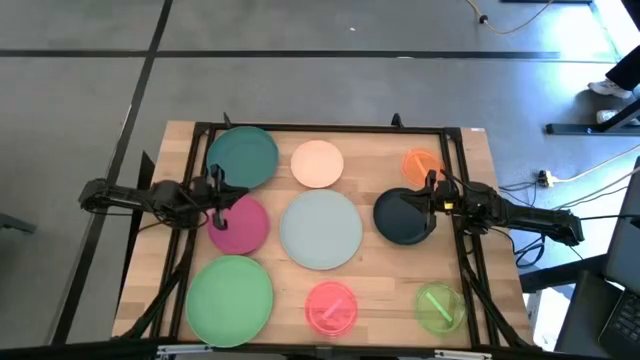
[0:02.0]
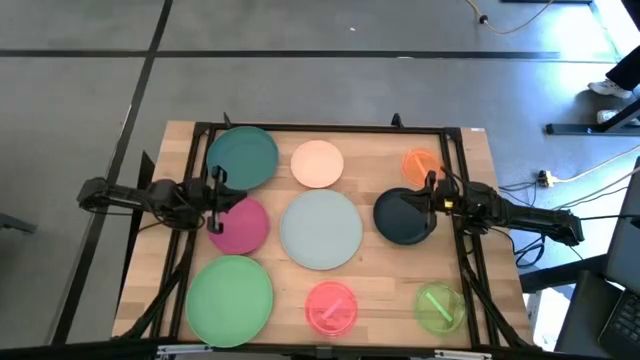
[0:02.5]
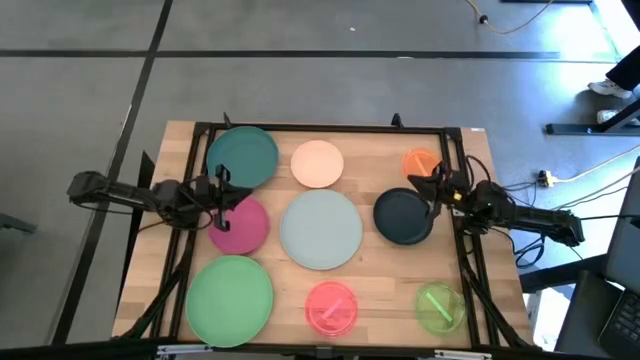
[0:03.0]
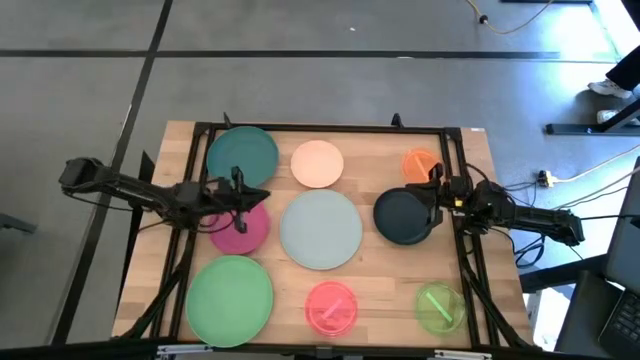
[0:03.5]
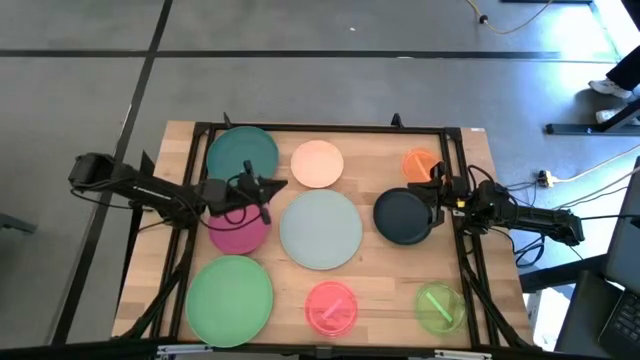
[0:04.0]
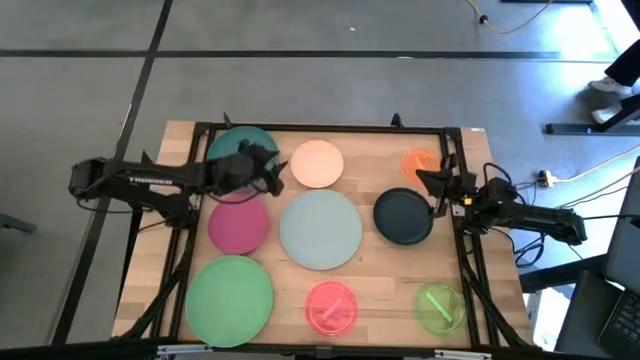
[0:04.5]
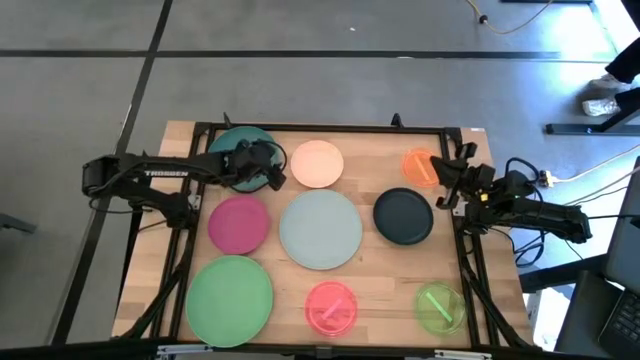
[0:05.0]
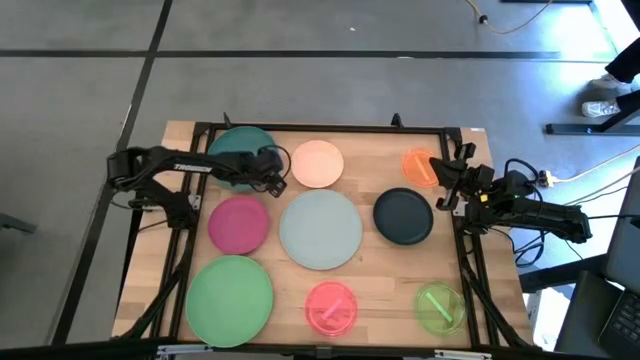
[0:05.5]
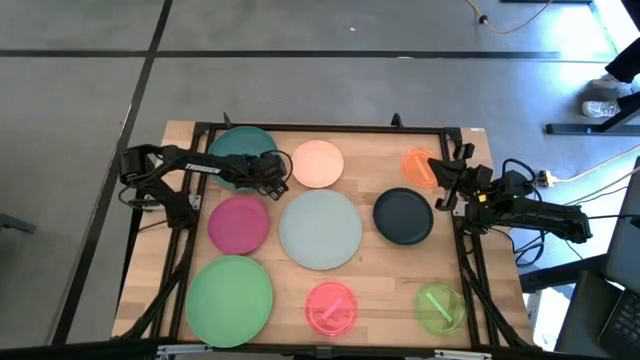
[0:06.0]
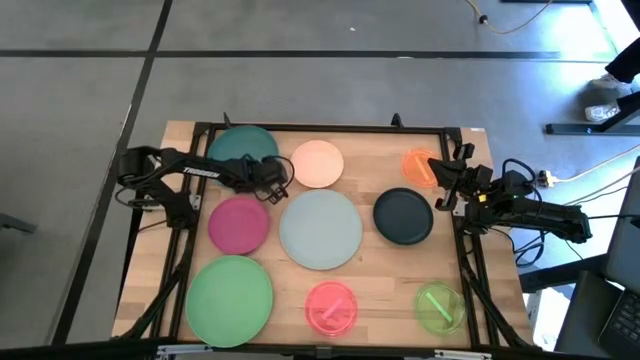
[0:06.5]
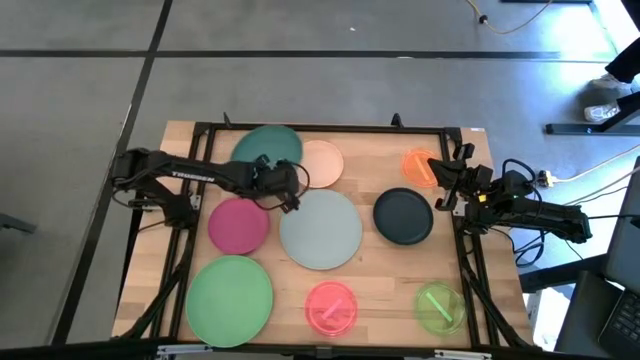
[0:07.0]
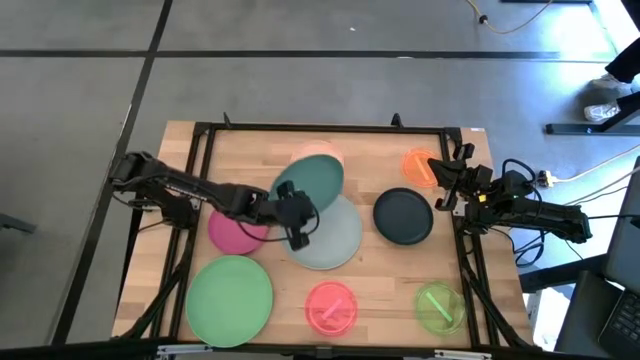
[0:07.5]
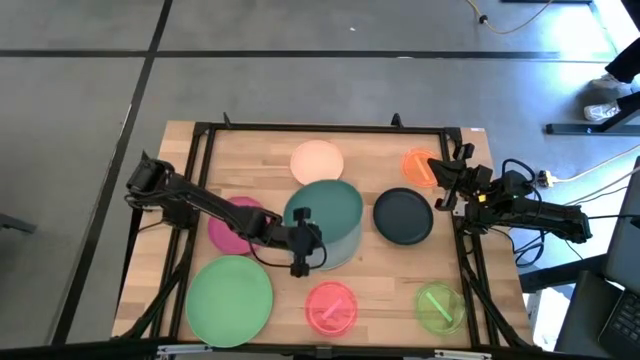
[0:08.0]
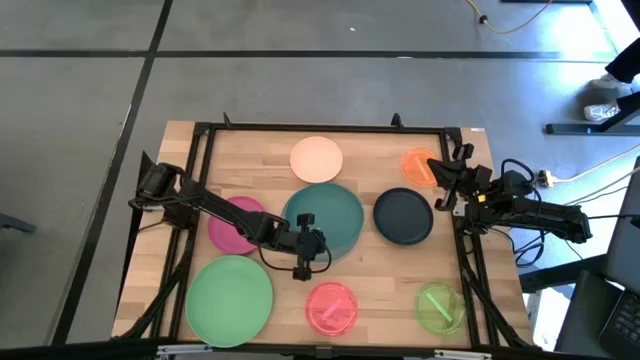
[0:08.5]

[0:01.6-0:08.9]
Task: Stack plastic plates
Stack the dark green plate on top of the blue plate

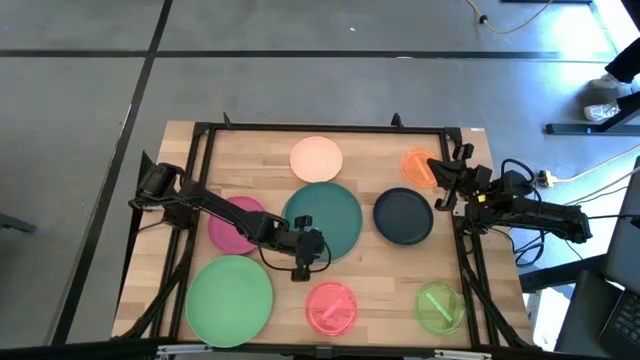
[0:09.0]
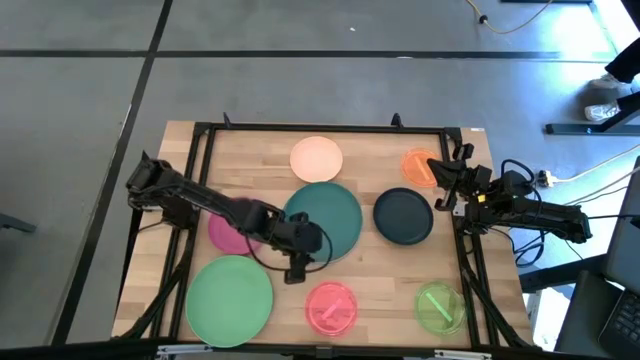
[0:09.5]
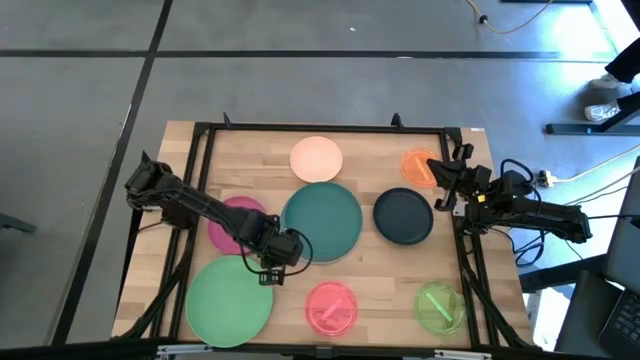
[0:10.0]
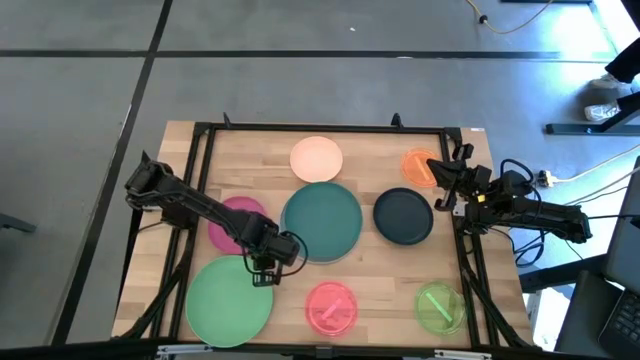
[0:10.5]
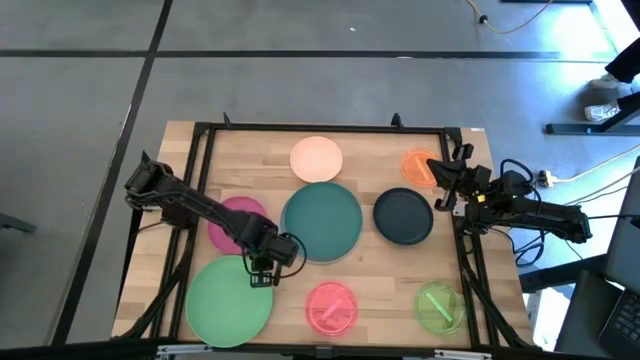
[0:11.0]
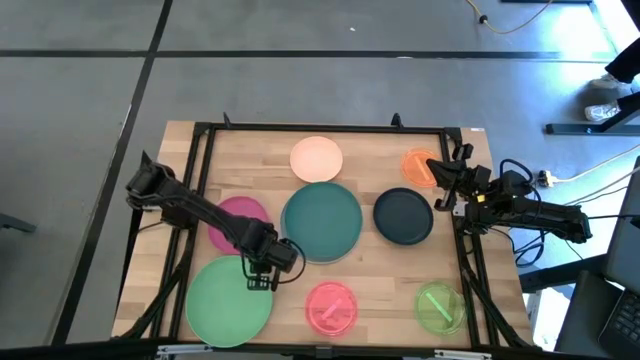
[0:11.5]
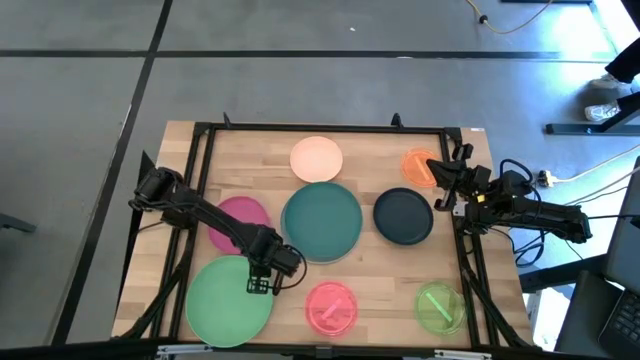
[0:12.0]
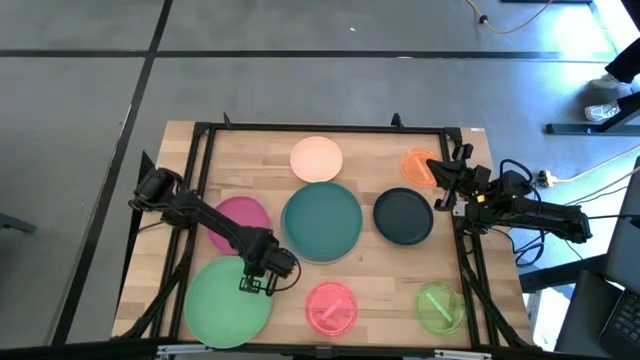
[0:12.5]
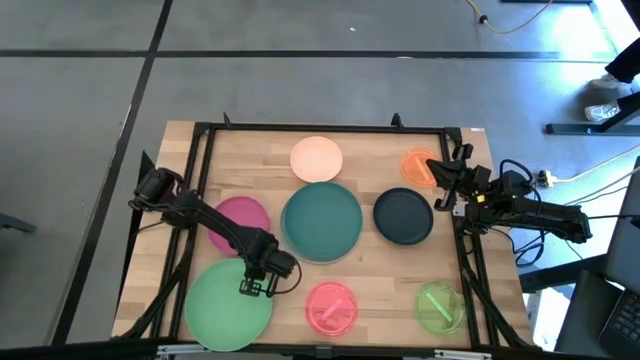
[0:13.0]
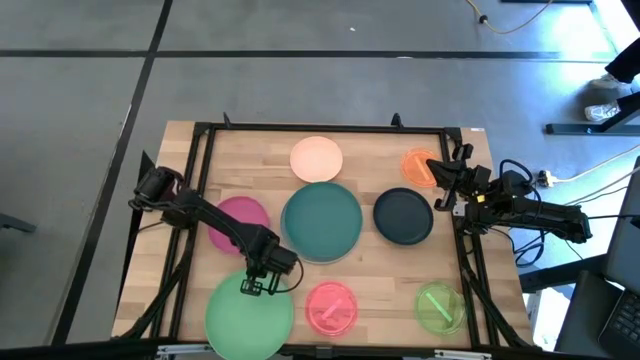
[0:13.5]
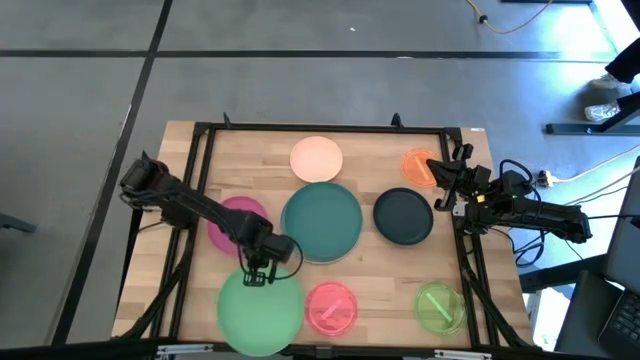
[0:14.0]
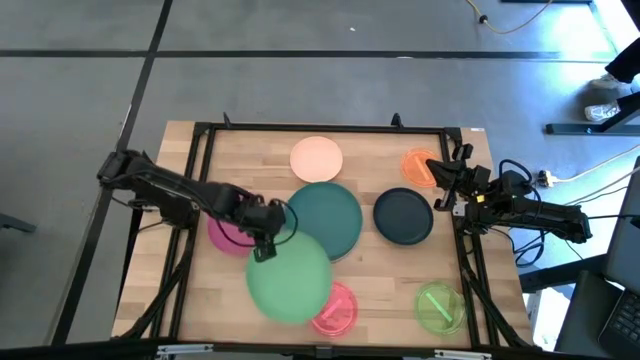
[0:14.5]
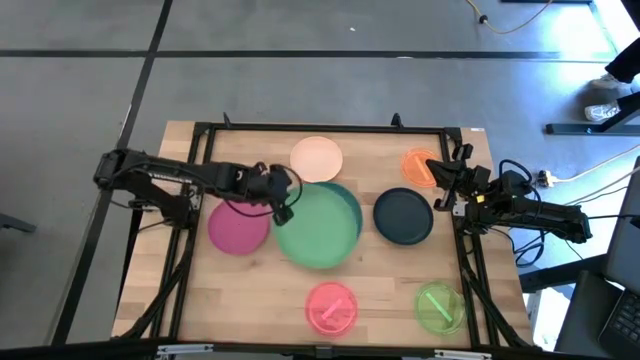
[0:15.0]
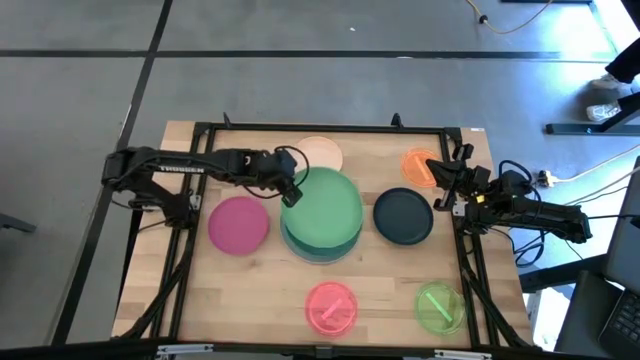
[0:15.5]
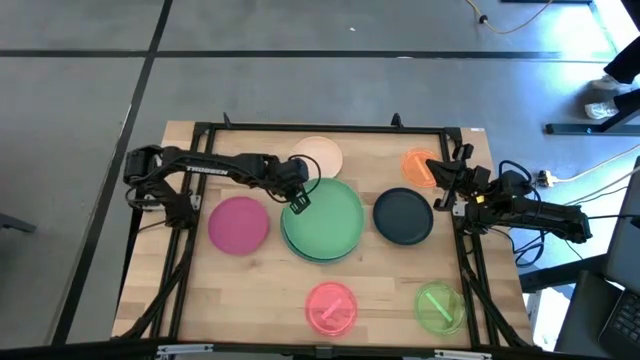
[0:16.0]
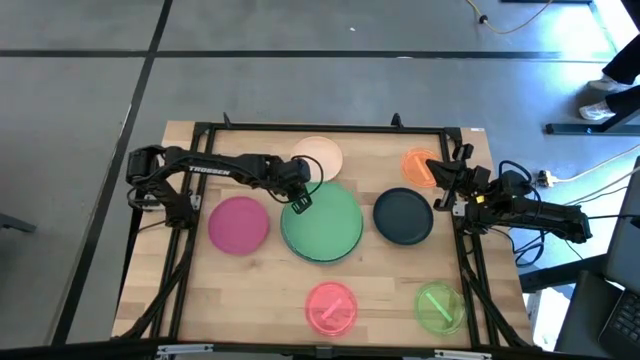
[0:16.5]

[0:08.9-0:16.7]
Stack the green plate on top of the dark green plate

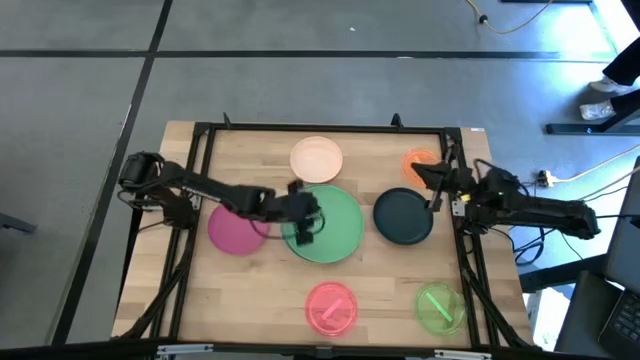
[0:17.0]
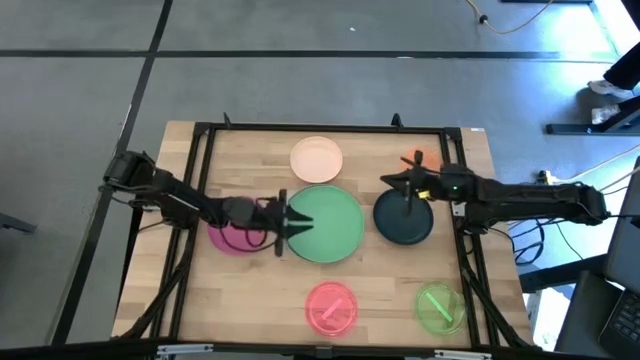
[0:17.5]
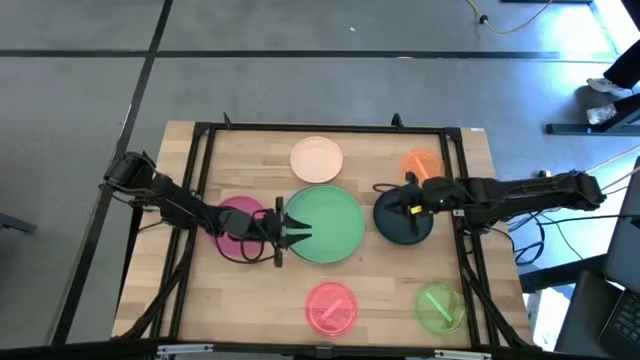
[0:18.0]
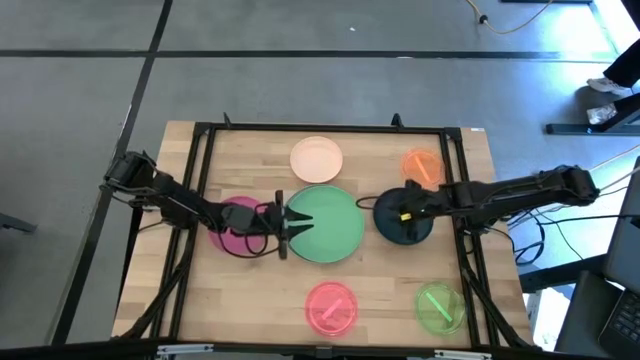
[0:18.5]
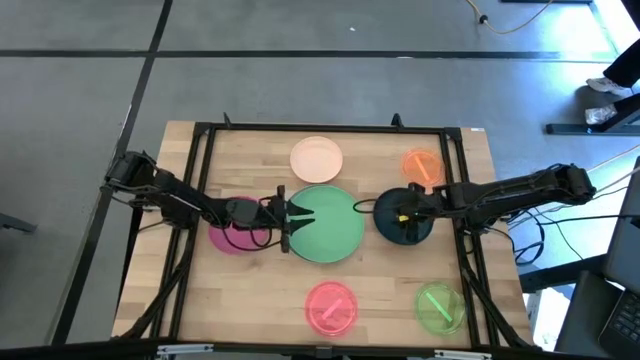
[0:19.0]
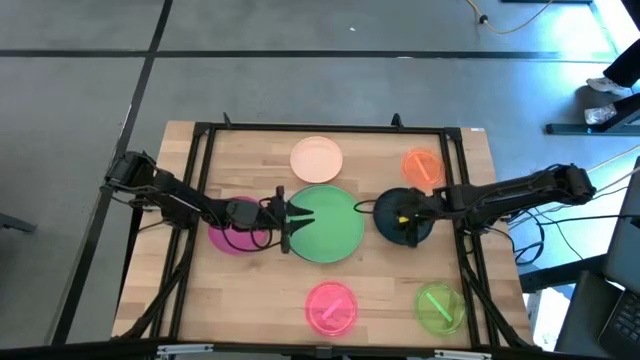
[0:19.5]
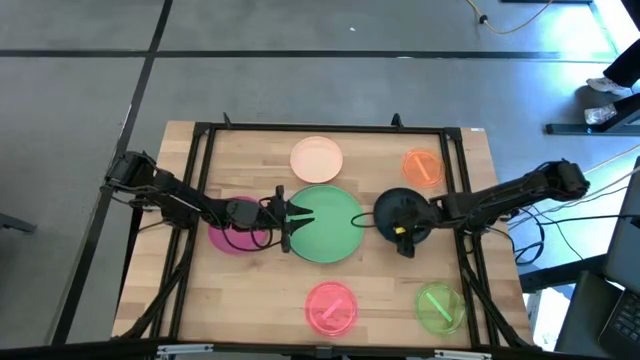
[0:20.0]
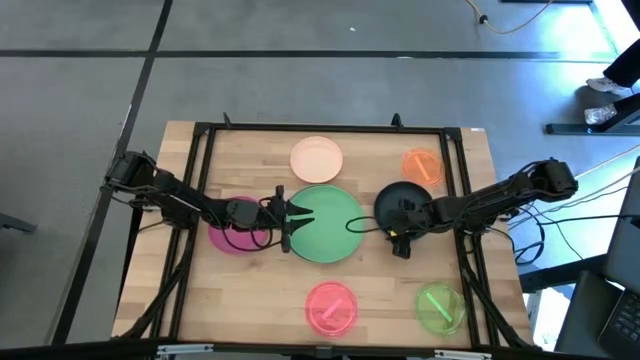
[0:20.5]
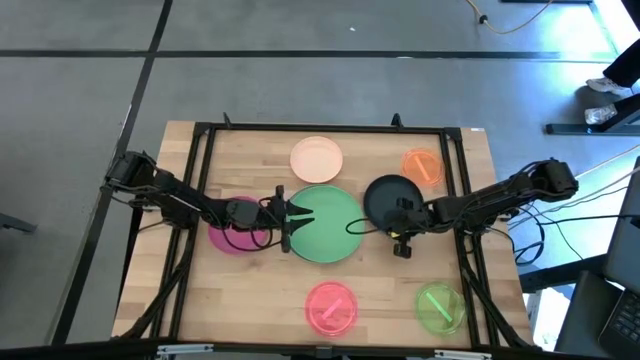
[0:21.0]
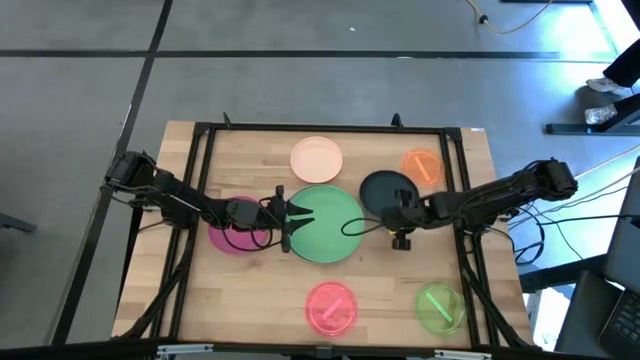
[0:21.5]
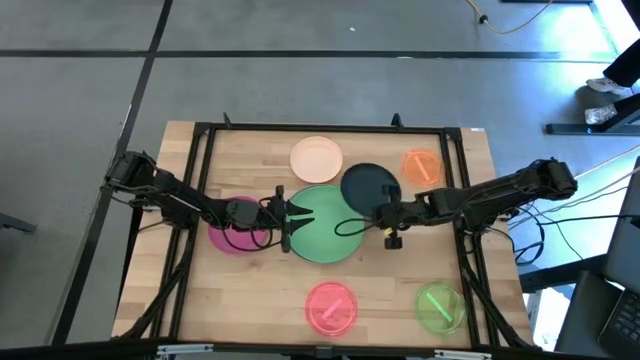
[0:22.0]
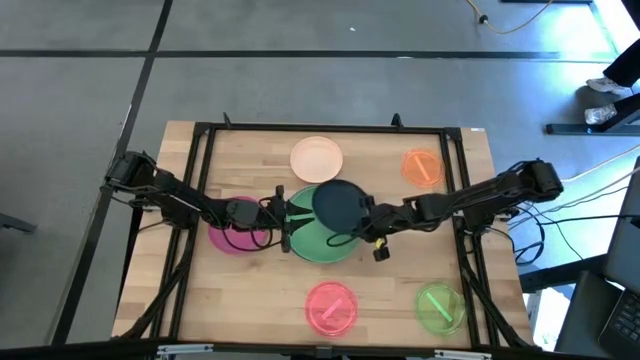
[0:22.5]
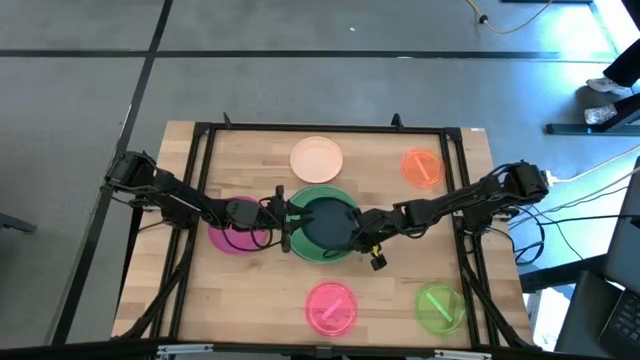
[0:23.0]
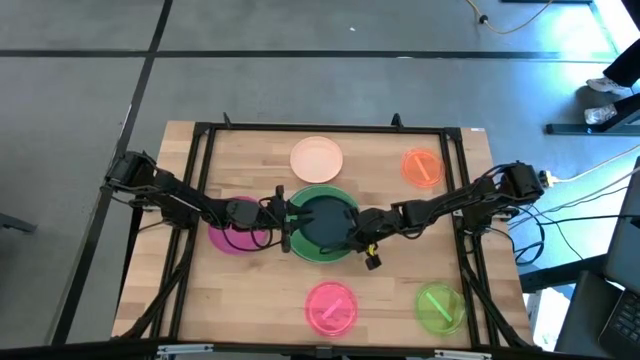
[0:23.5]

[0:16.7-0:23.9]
Stack the black plate on top of the green plate
